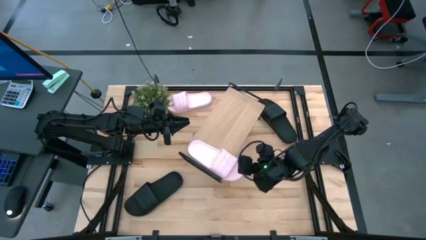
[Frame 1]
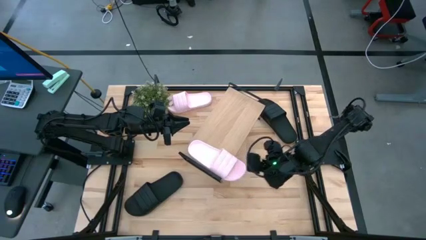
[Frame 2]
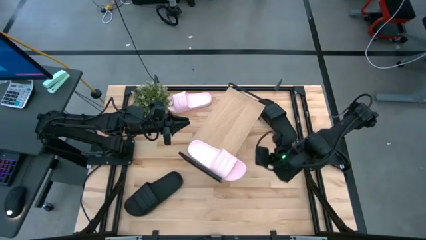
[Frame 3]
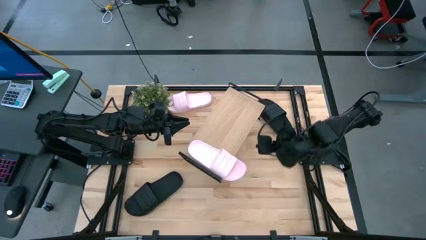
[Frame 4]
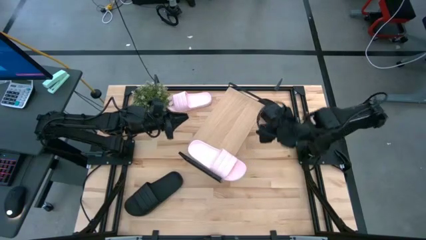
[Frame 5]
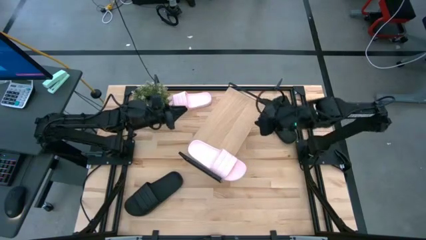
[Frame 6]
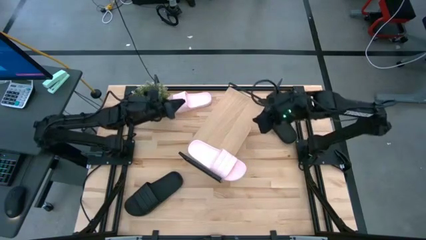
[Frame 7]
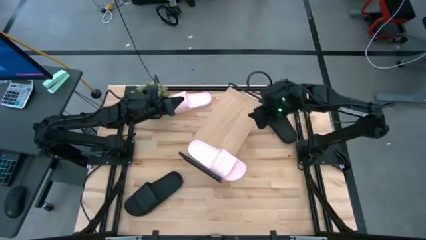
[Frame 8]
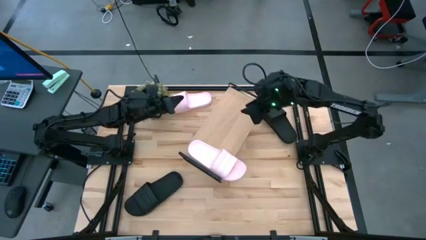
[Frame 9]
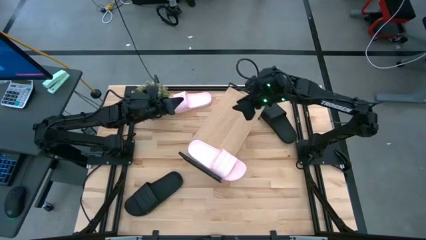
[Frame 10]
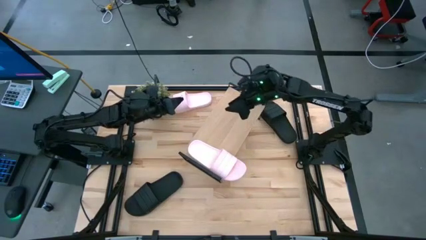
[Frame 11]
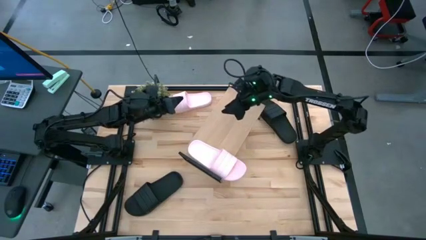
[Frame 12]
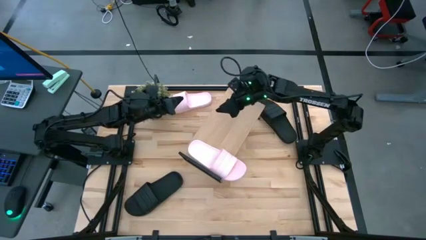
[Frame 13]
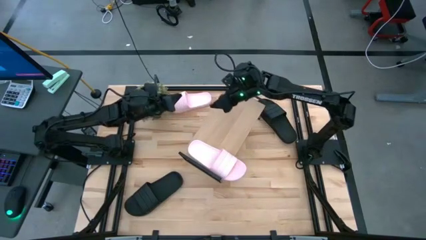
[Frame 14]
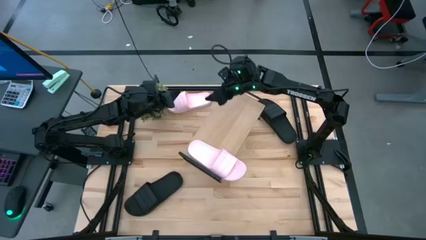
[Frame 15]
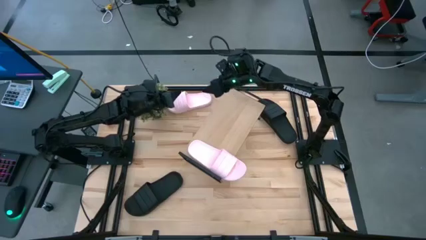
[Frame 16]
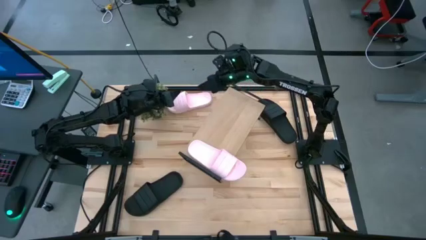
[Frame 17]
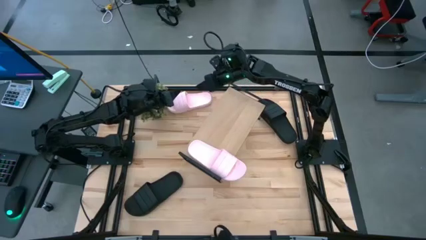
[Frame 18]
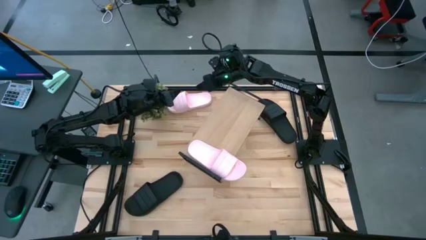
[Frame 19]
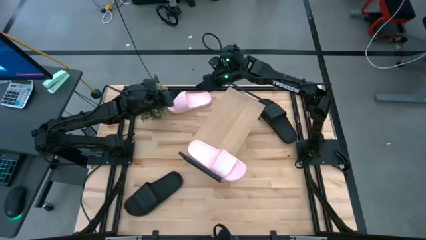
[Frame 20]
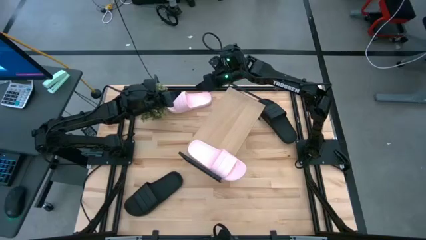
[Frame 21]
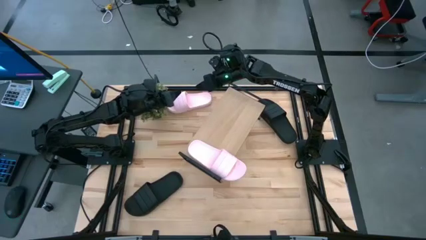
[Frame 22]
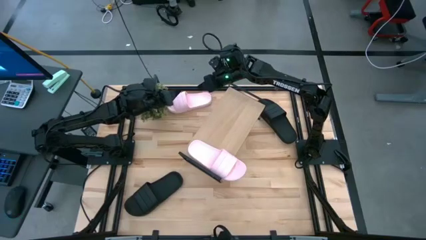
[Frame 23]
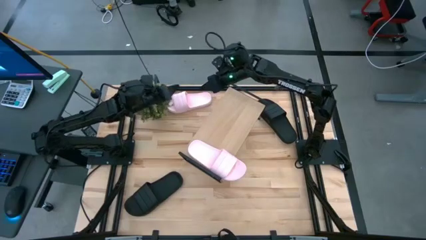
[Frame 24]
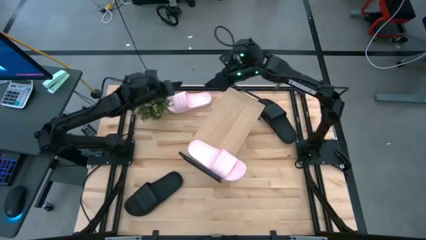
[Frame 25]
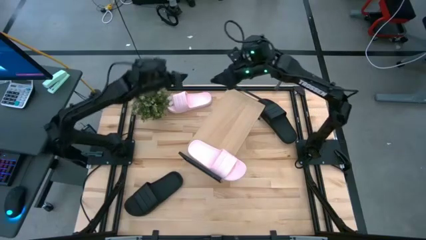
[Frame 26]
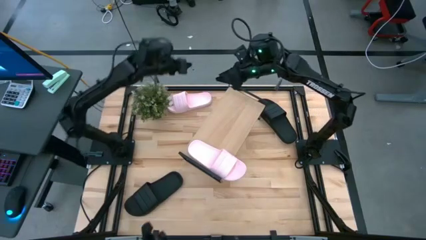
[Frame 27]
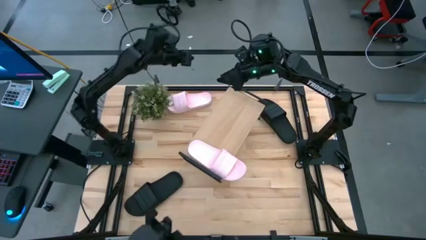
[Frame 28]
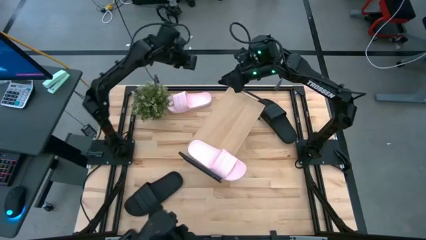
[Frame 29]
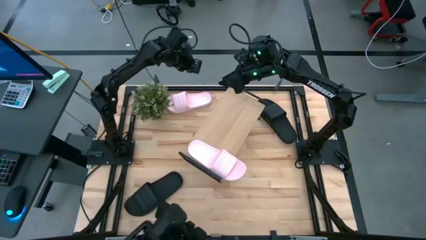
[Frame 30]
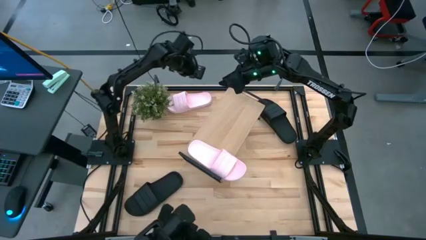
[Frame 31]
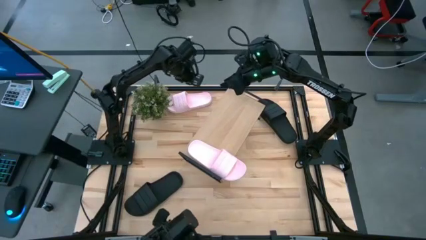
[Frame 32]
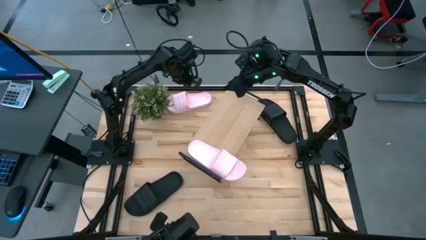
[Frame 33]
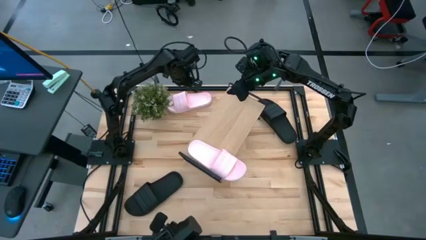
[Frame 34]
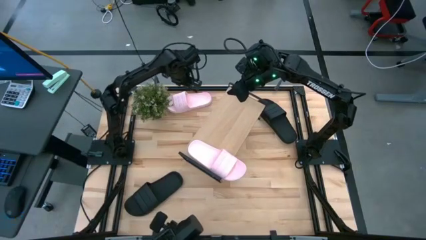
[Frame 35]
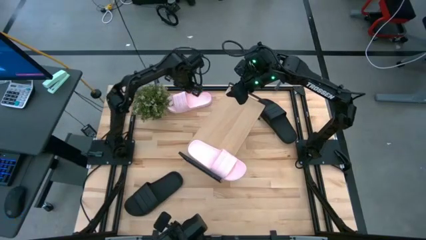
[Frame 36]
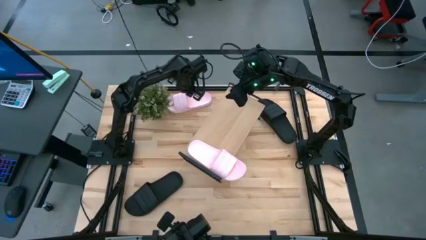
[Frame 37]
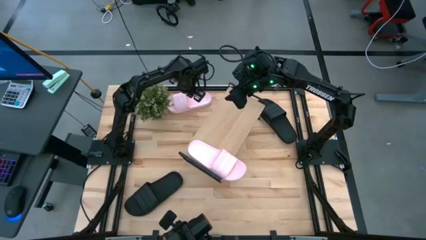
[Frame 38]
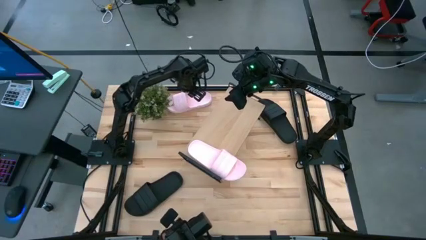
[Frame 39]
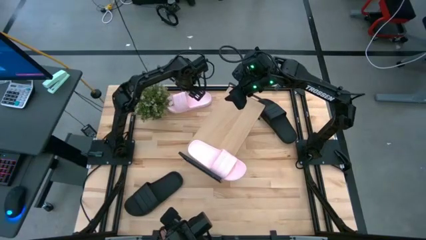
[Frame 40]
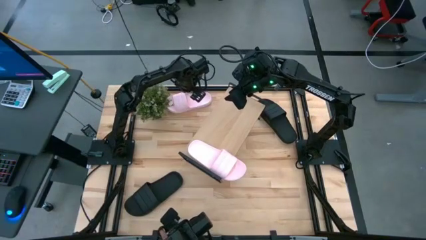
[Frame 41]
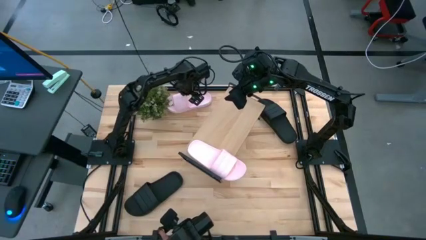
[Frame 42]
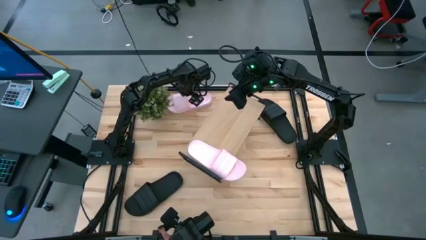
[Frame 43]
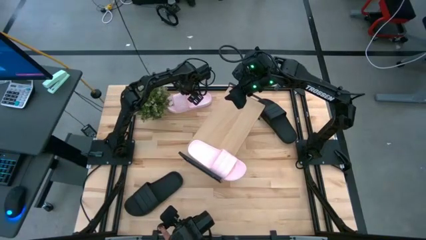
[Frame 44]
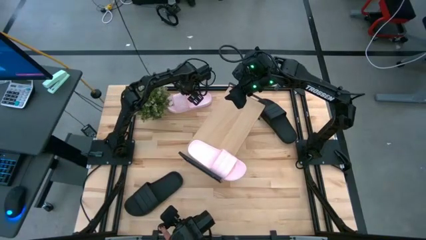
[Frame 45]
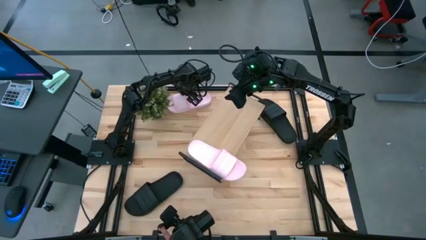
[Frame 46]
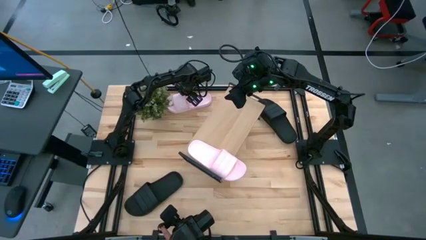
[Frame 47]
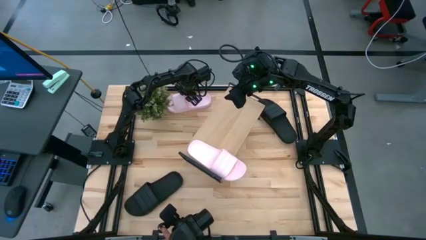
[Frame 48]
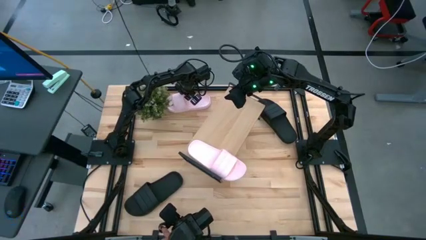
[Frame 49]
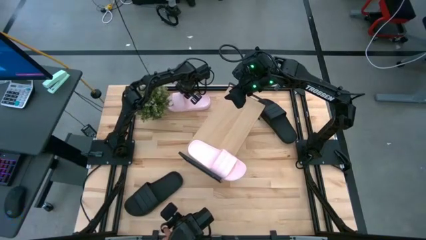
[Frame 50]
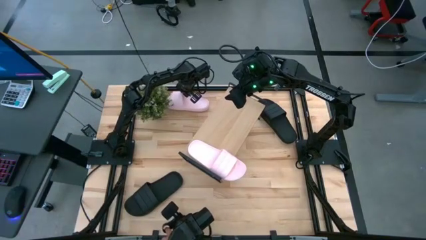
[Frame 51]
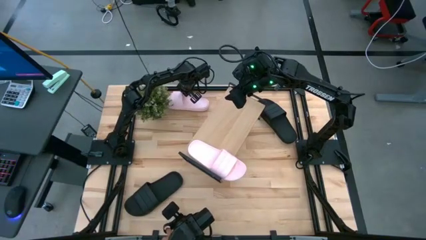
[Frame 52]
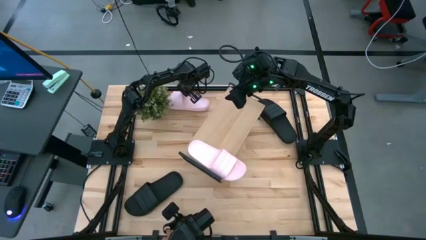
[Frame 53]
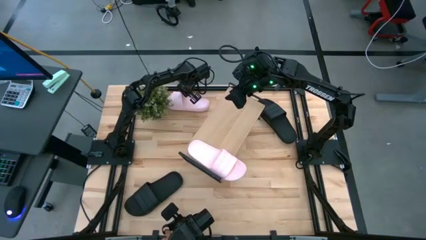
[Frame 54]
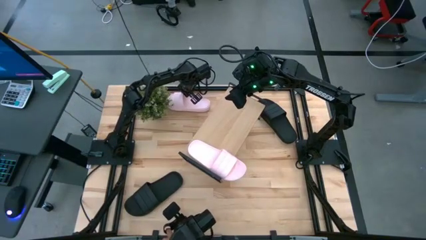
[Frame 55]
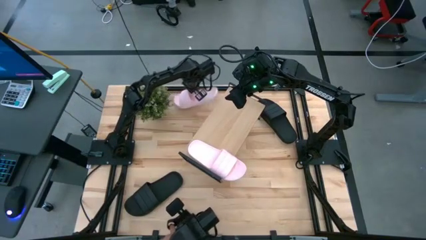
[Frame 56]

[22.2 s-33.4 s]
Task: Pick and place slides into the shelf
Put the pink slipper on the shelf
